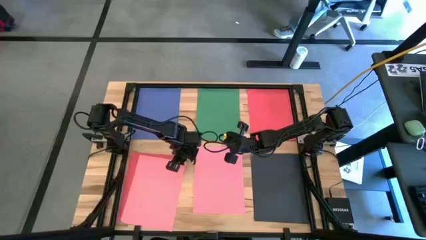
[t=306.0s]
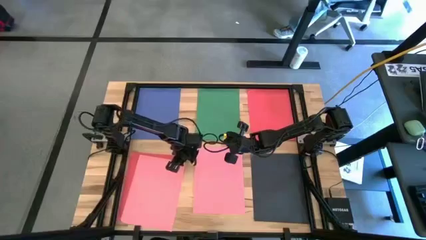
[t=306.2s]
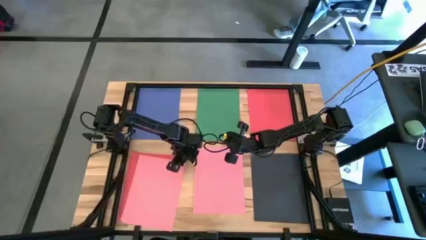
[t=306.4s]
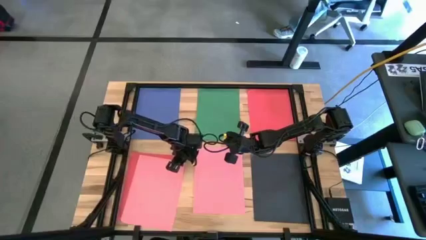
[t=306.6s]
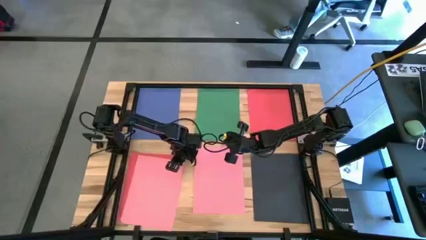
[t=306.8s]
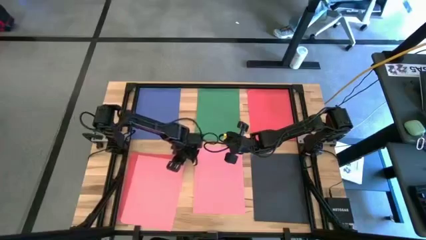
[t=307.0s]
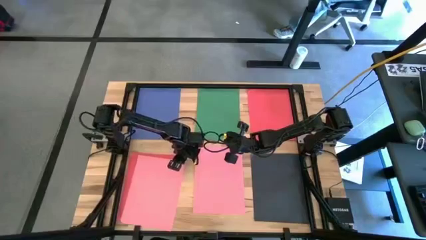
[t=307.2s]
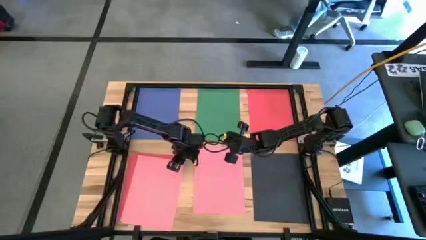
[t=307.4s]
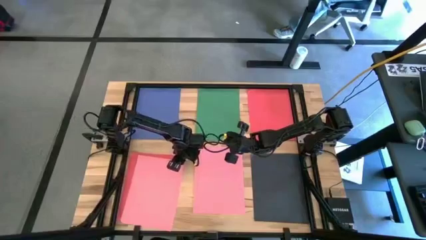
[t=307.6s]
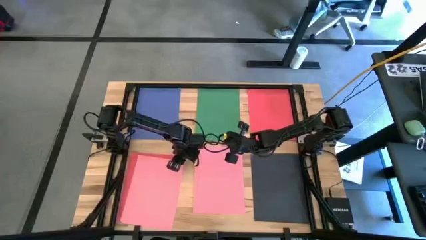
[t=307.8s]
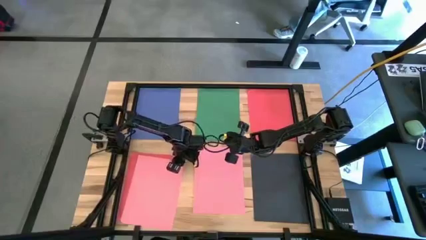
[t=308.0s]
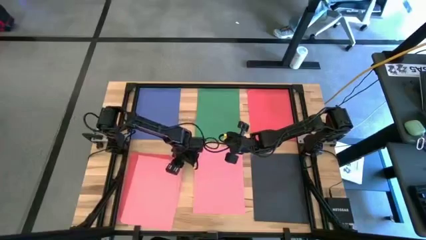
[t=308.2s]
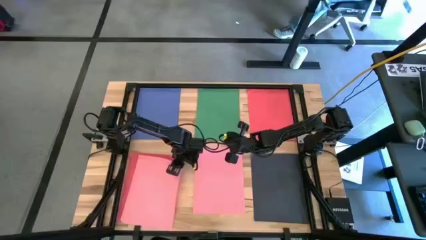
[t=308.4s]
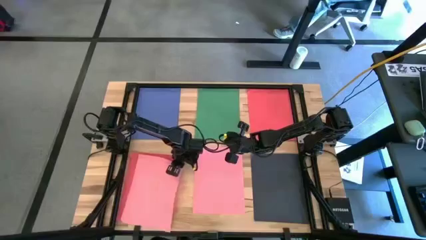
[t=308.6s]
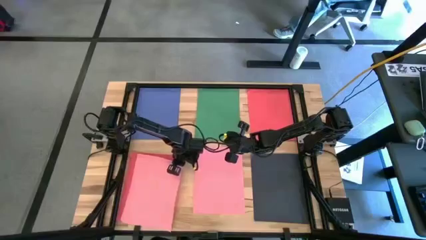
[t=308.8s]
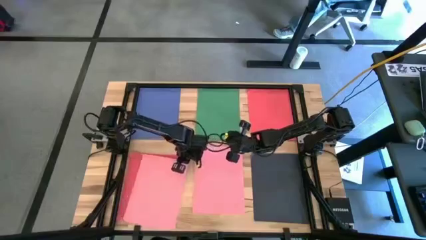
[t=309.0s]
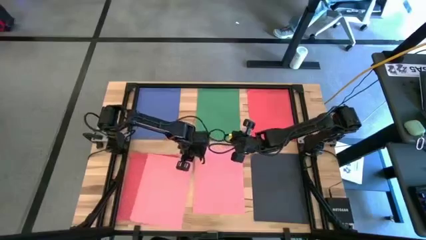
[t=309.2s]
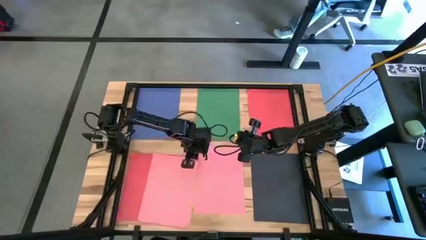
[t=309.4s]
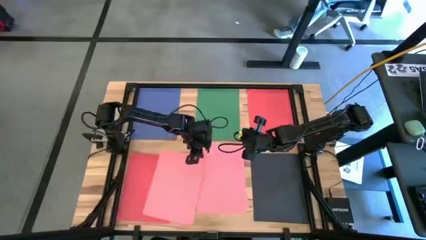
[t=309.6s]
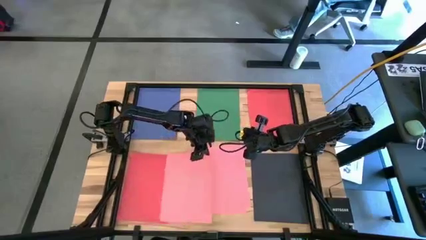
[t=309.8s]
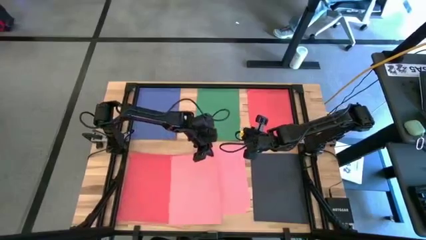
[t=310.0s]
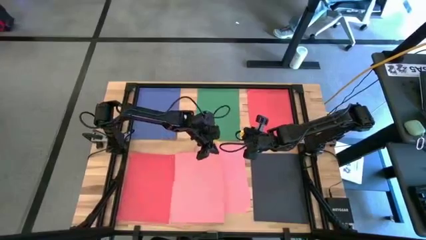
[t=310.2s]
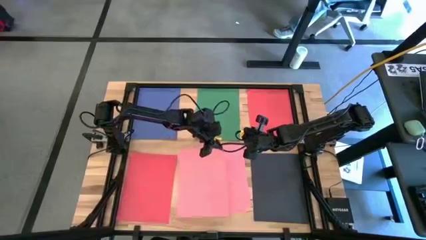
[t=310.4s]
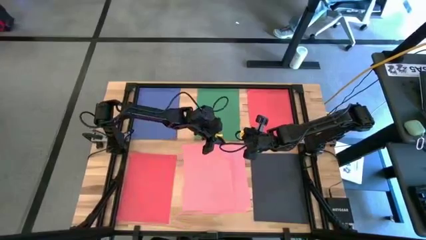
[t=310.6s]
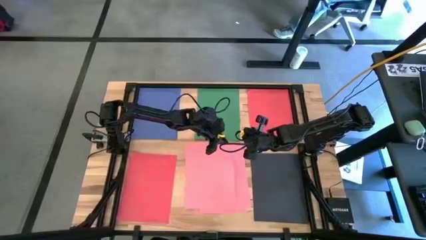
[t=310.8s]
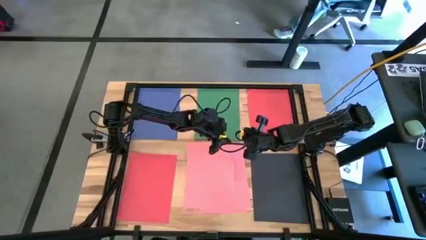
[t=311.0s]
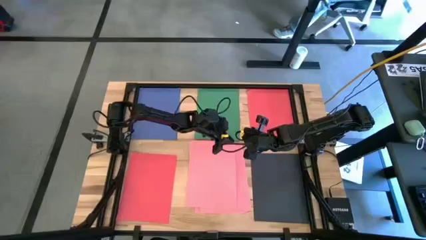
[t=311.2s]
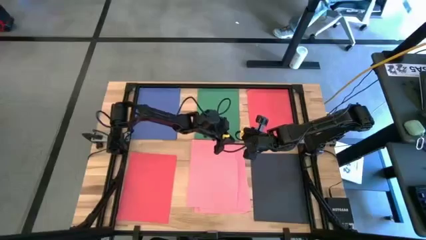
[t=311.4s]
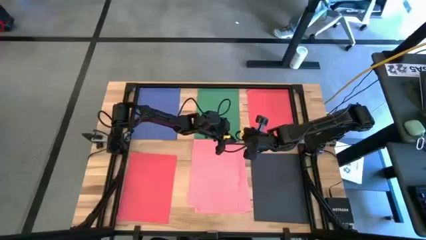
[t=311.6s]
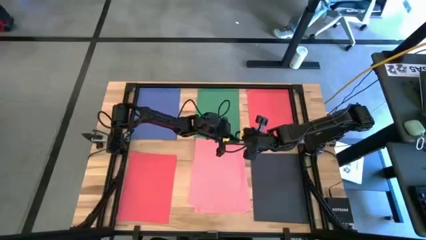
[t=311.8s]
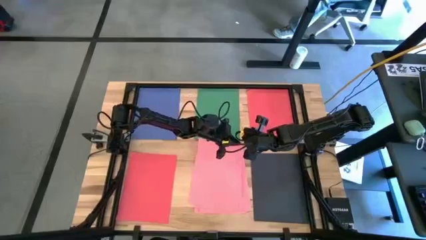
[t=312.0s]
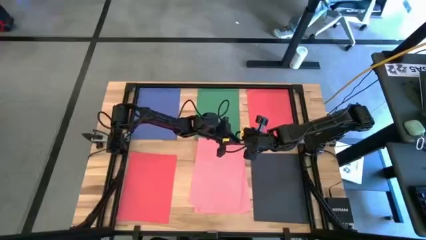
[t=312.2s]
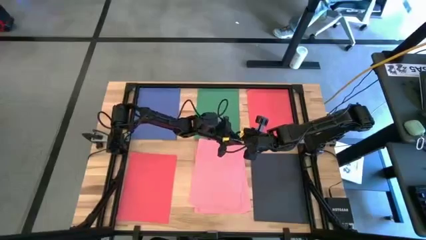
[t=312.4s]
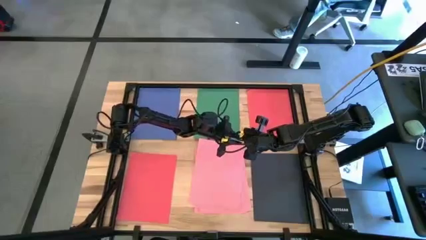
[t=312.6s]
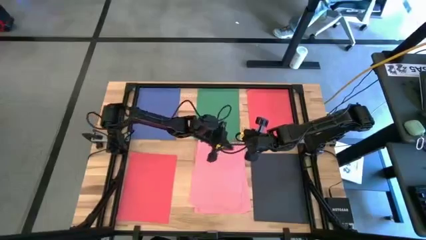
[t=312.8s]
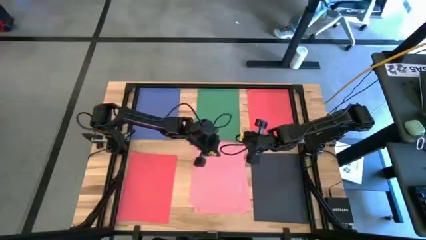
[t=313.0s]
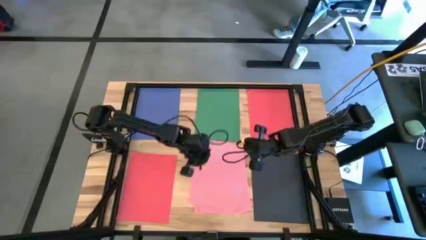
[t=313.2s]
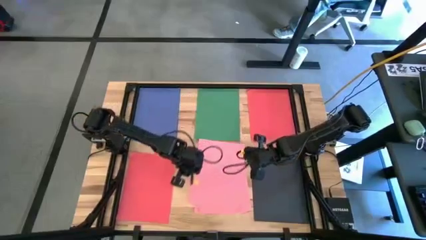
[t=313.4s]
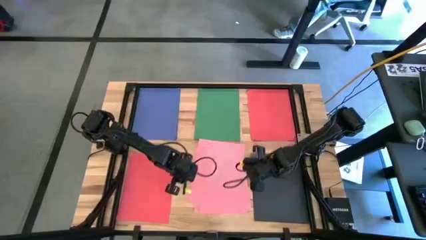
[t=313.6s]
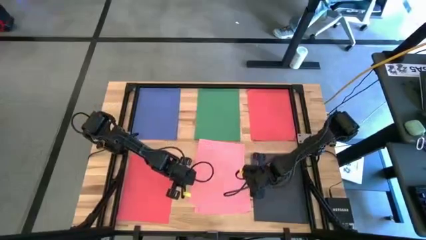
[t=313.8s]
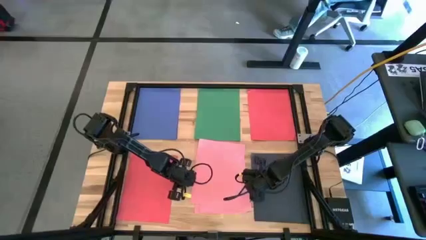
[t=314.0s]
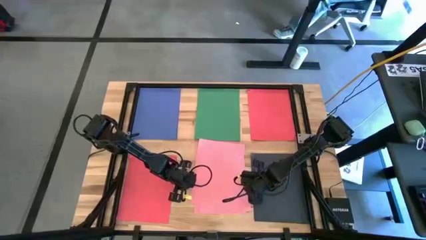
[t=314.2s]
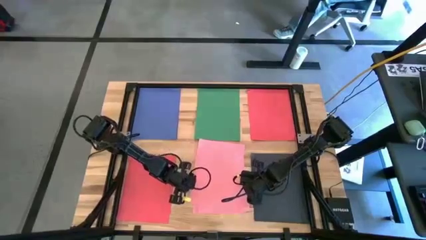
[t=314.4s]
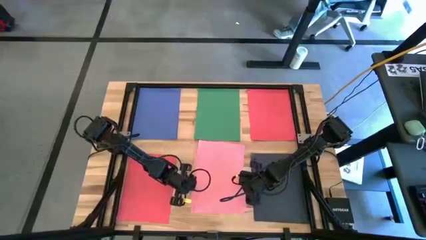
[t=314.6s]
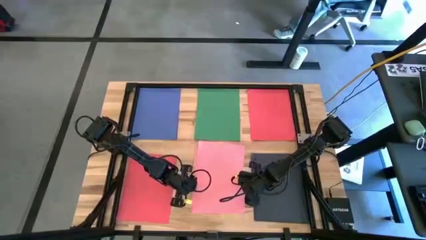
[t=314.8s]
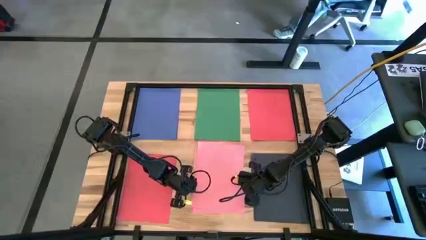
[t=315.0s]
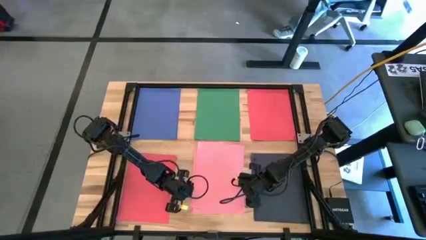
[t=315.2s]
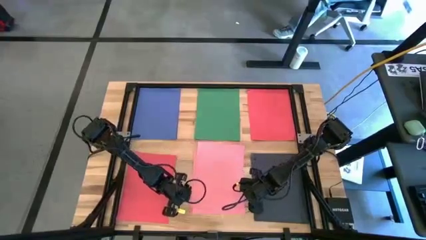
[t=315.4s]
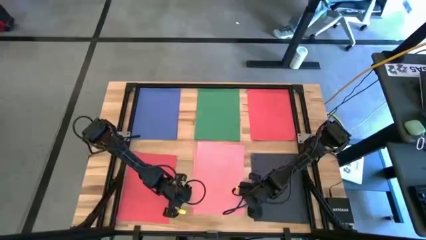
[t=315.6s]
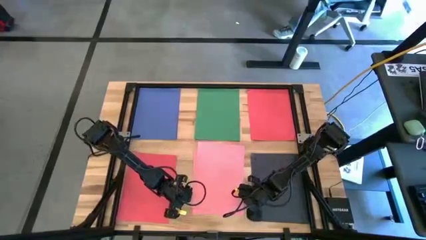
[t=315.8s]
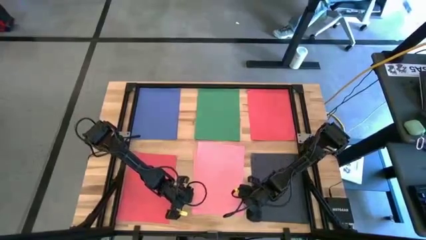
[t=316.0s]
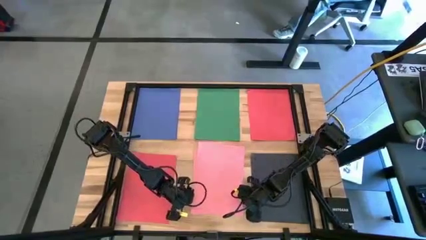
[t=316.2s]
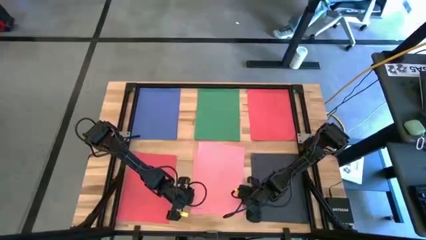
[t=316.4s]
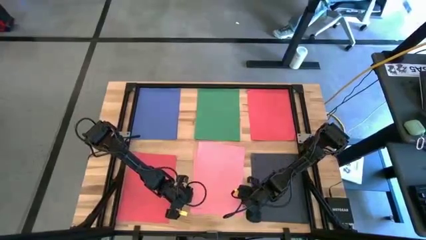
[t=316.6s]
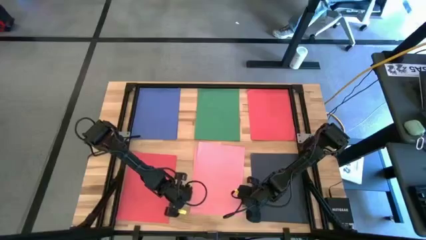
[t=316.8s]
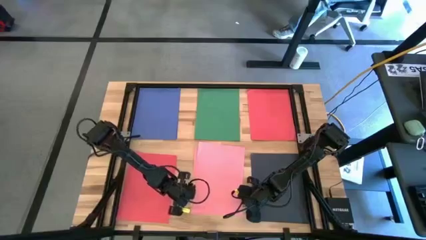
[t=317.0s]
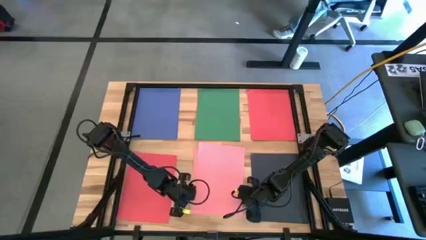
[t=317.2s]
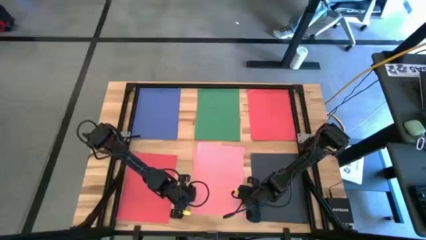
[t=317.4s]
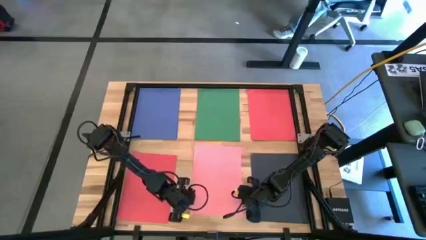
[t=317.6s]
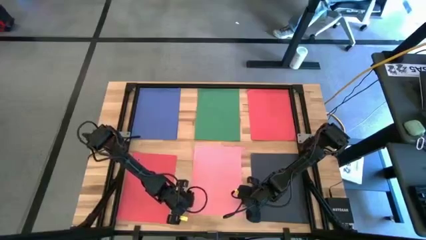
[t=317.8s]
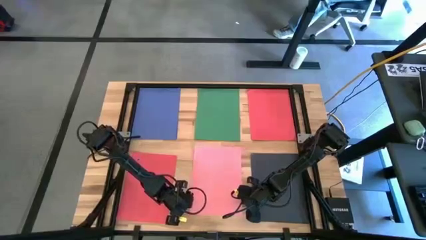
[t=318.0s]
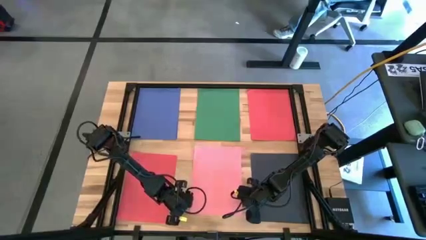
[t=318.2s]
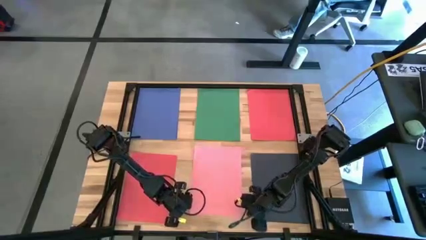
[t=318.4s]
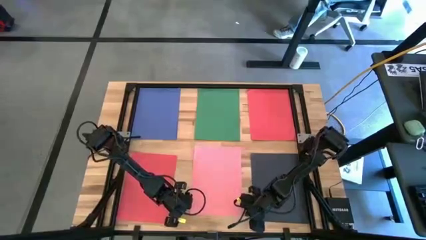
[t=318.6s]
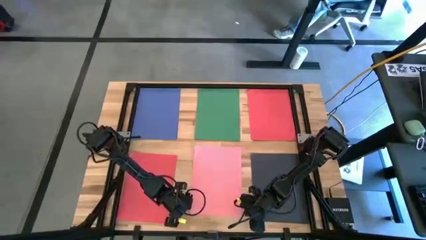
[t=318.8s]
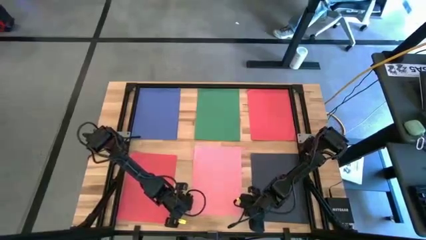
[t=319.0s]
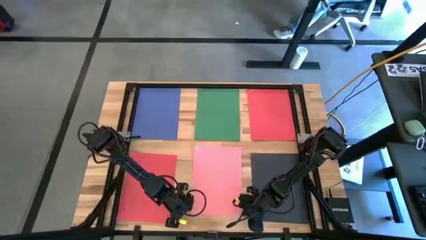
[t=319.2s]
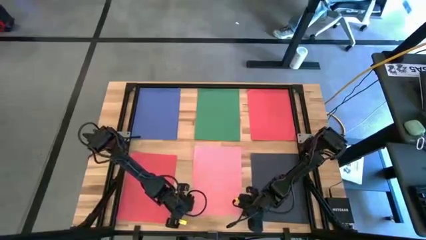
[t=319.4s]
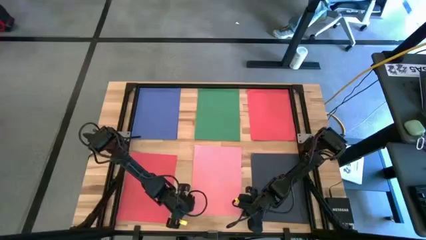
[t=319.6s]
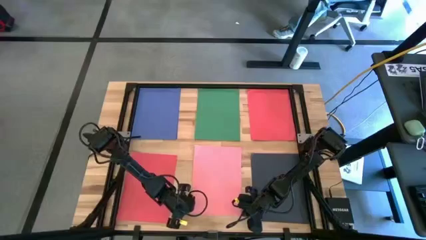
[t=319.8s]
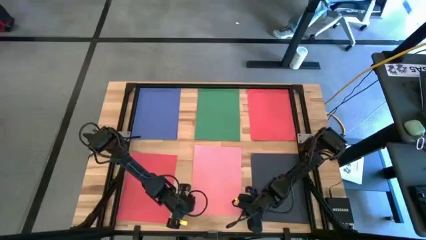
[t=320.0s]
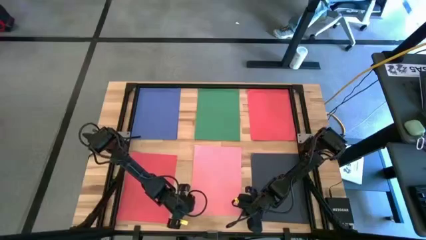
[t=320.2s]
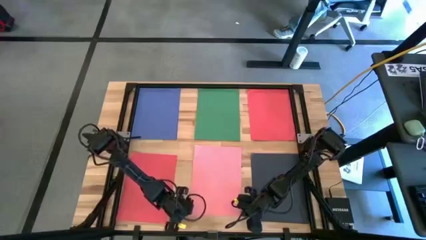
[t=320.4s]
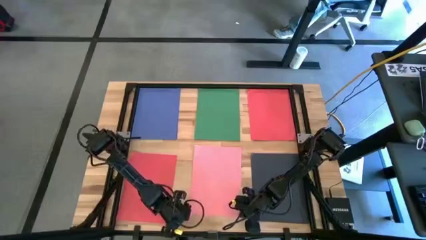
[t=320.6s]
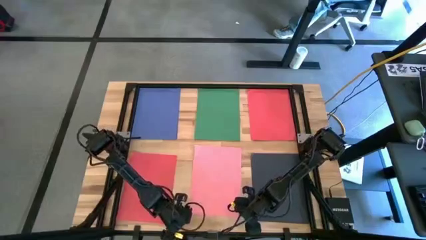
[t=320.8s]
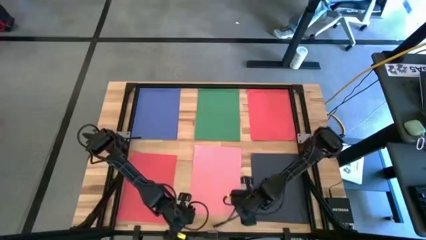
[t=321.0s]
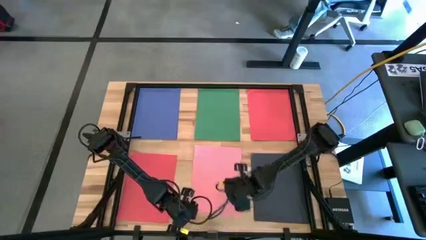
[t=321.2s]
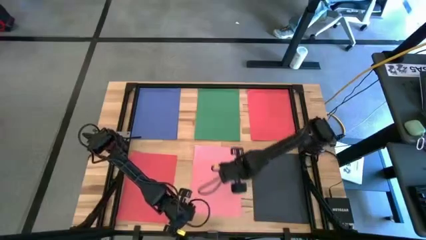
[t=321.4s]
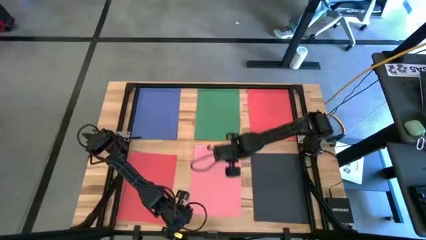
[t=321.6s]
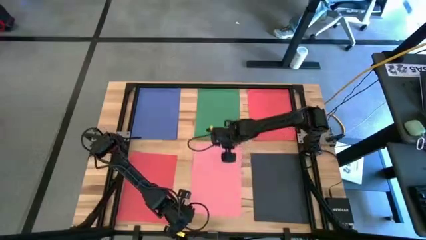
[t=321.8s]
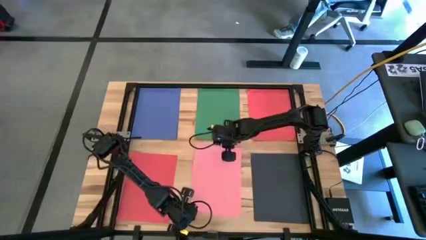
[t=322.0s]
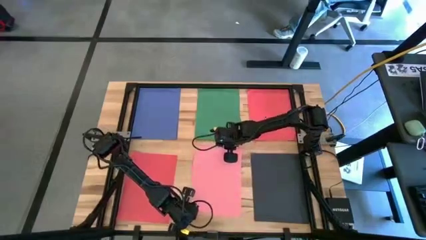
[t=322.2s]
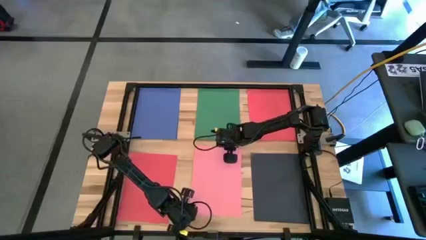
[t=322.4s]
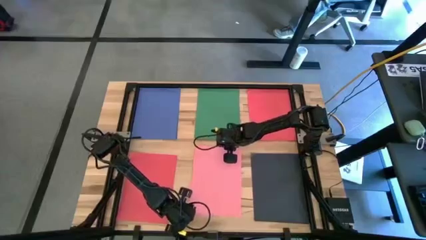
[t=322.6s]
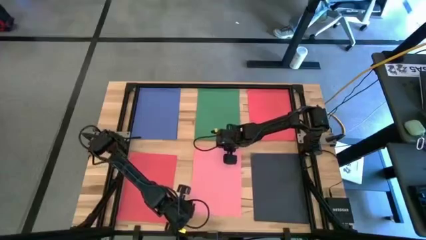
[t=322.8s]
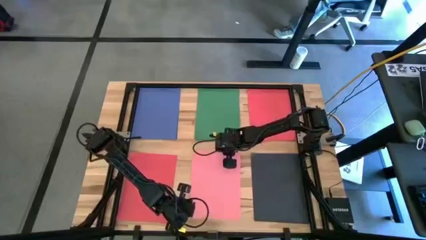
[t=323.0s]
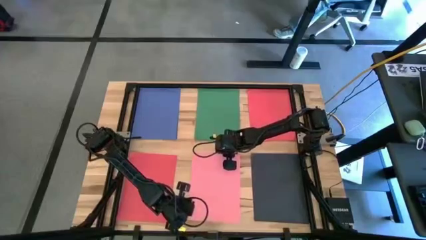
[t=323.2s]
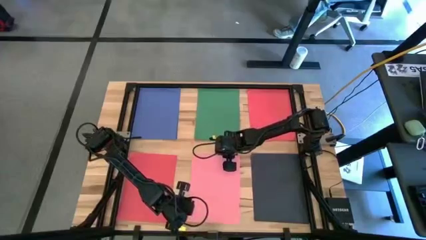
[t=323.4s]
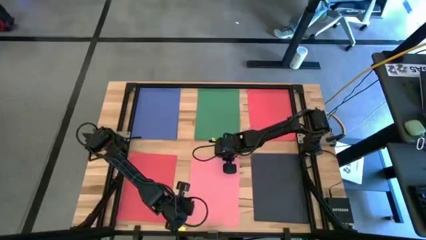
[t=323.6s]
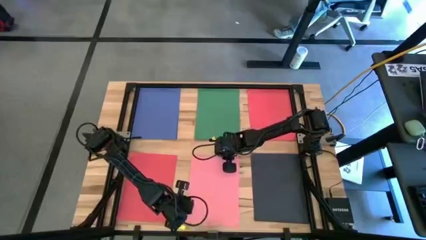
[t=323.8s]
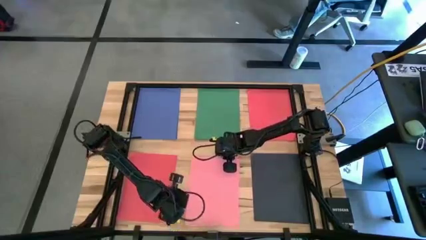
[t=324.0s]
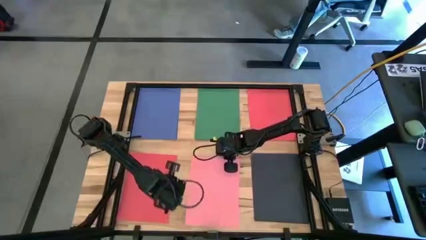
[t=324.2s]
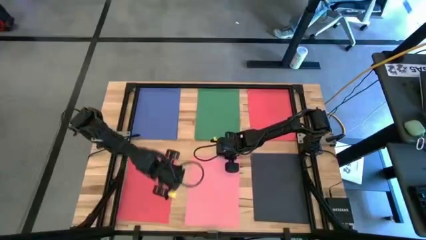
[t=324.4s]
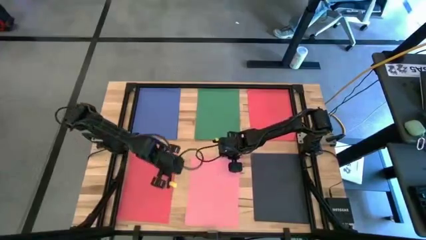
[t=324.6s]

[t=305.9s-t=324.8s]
Task: Organize paper
Stack the pink paper on top of the other pink paper
